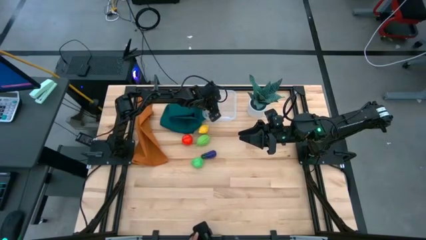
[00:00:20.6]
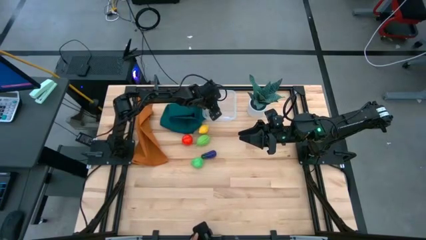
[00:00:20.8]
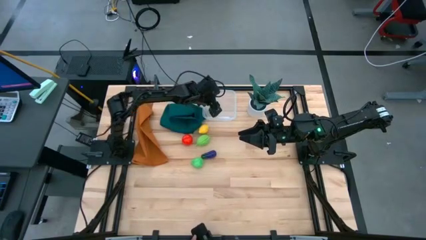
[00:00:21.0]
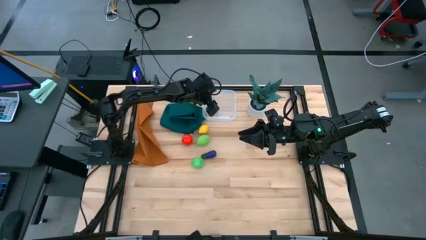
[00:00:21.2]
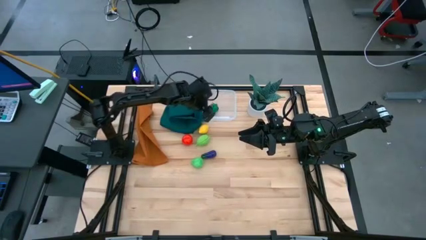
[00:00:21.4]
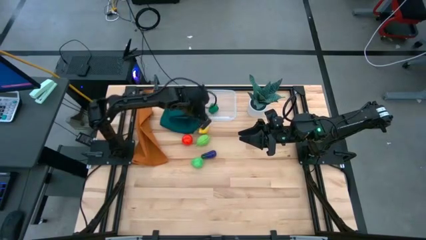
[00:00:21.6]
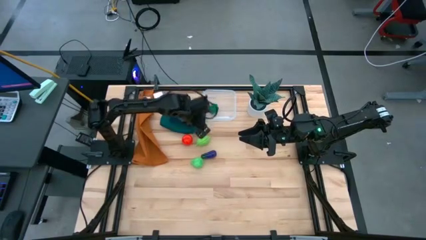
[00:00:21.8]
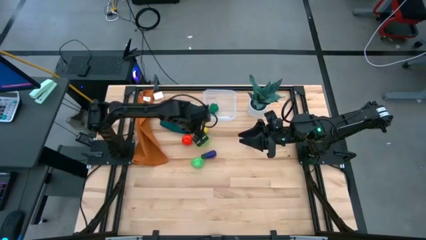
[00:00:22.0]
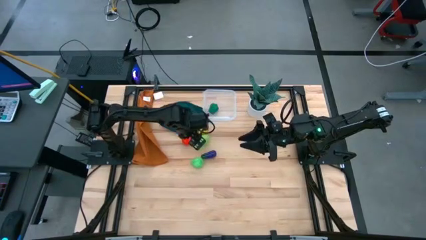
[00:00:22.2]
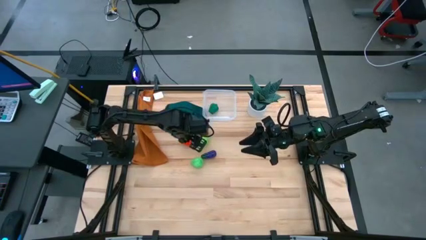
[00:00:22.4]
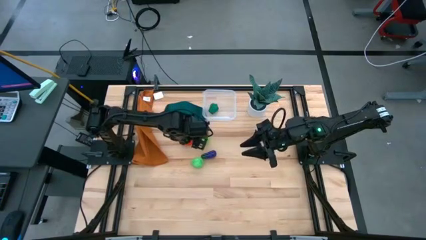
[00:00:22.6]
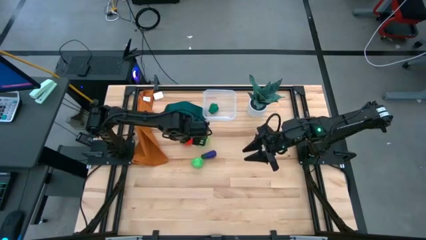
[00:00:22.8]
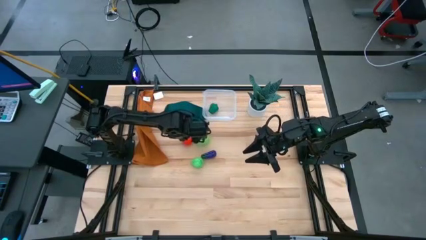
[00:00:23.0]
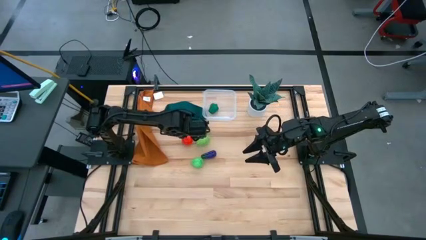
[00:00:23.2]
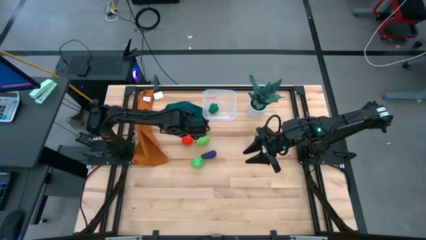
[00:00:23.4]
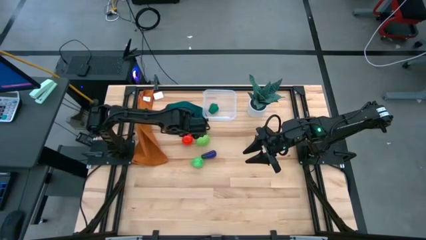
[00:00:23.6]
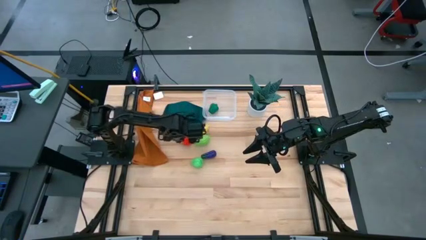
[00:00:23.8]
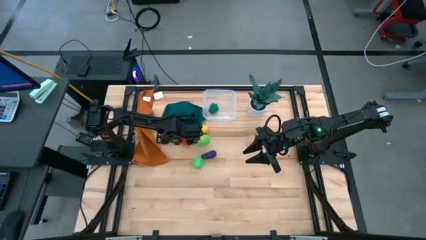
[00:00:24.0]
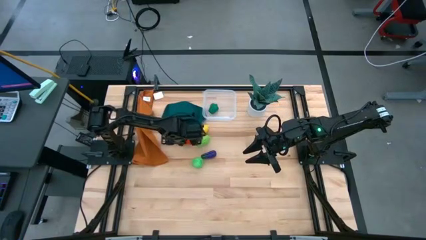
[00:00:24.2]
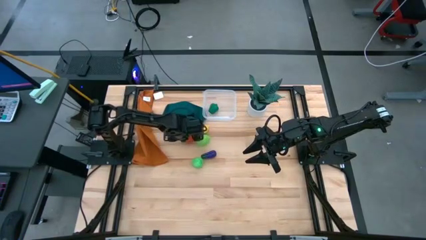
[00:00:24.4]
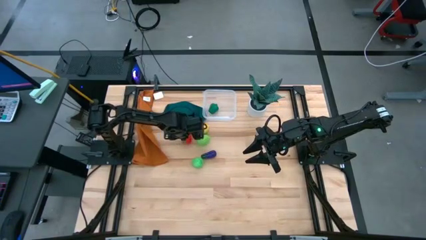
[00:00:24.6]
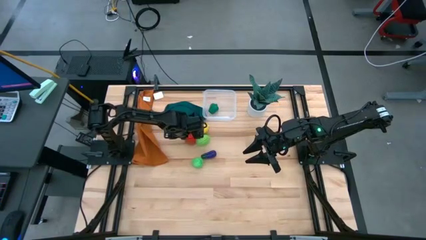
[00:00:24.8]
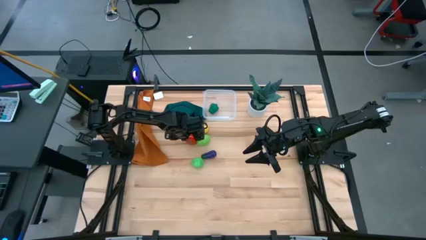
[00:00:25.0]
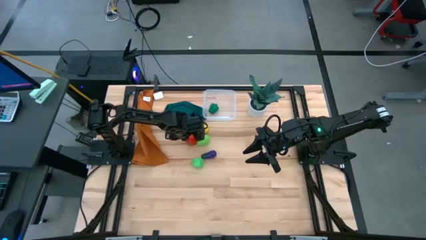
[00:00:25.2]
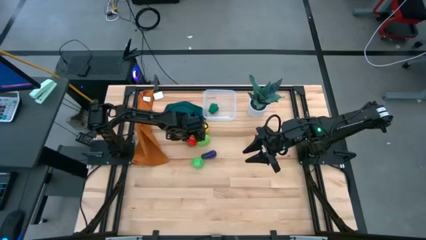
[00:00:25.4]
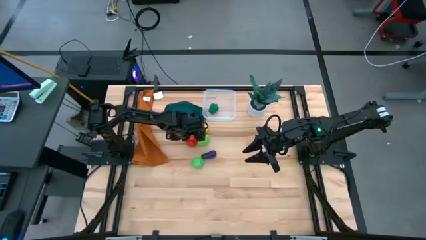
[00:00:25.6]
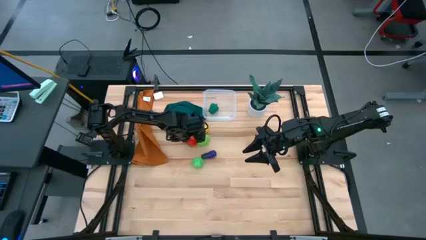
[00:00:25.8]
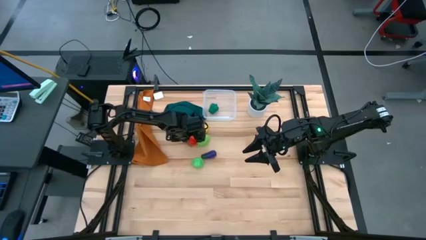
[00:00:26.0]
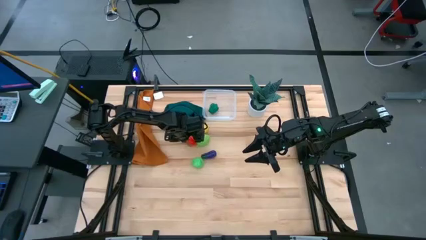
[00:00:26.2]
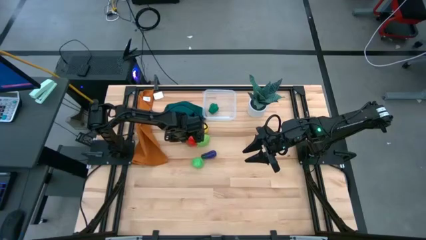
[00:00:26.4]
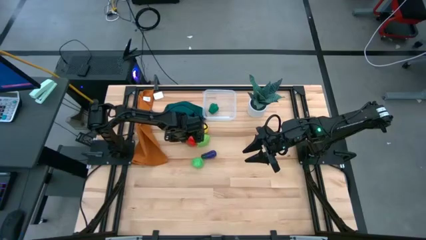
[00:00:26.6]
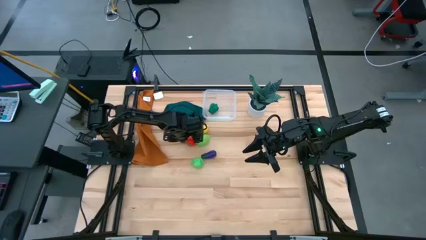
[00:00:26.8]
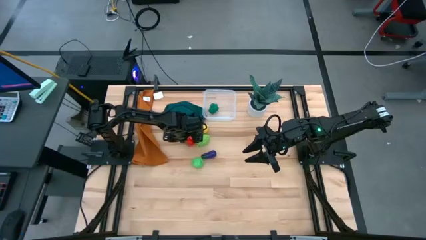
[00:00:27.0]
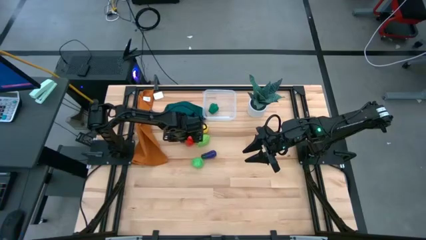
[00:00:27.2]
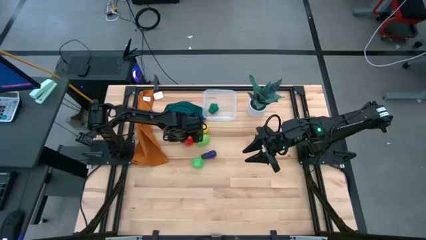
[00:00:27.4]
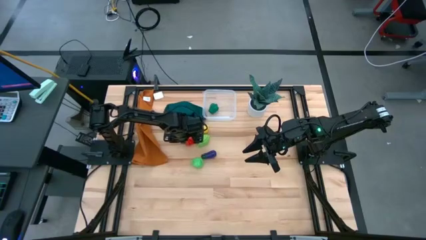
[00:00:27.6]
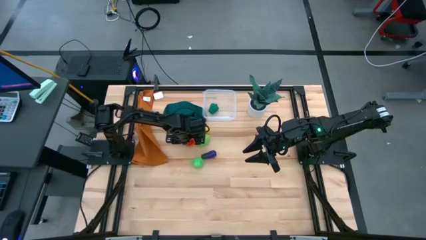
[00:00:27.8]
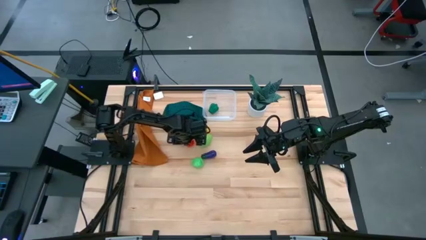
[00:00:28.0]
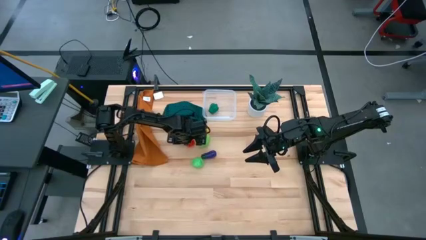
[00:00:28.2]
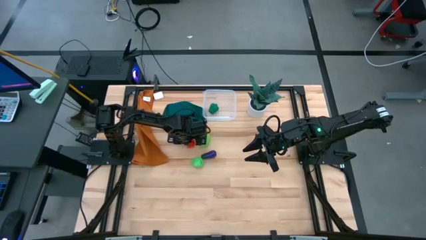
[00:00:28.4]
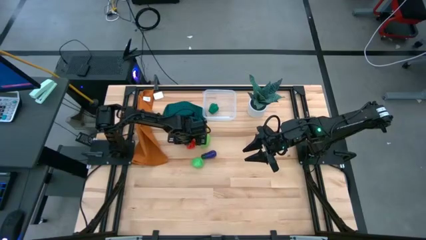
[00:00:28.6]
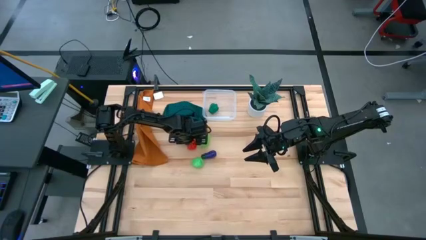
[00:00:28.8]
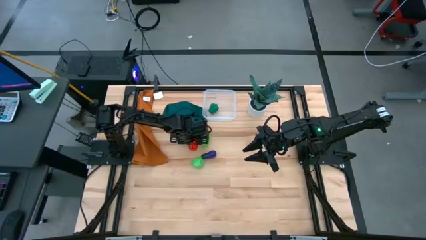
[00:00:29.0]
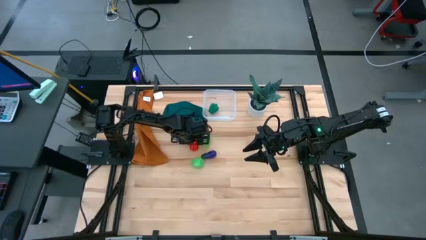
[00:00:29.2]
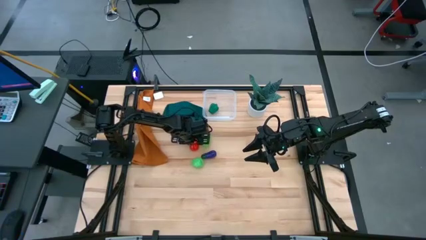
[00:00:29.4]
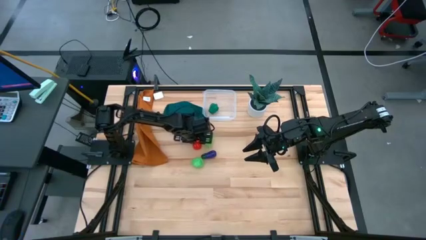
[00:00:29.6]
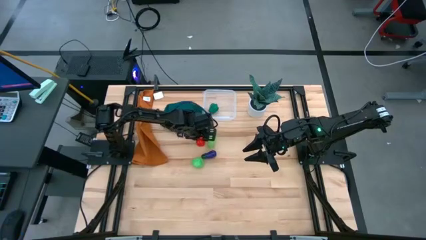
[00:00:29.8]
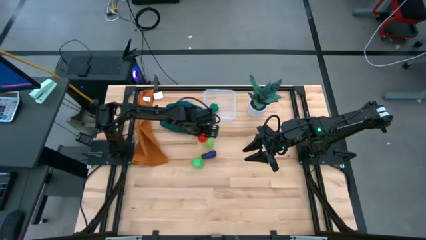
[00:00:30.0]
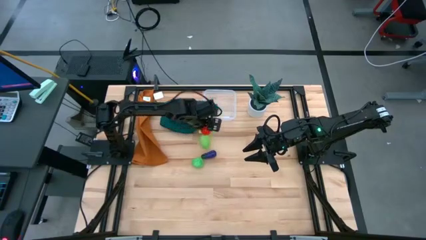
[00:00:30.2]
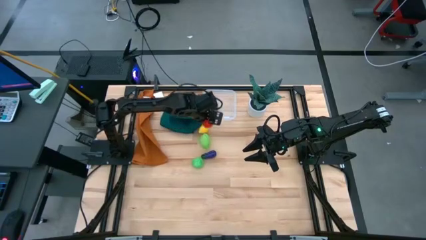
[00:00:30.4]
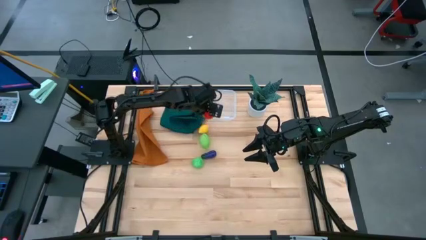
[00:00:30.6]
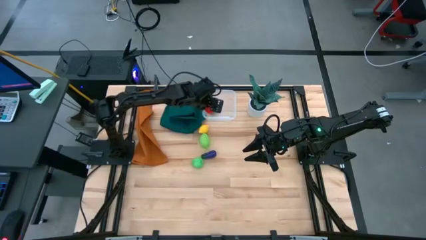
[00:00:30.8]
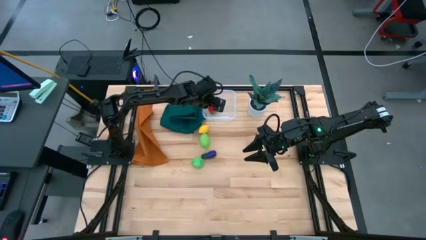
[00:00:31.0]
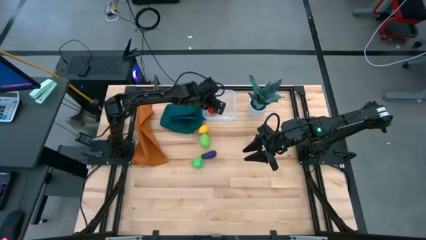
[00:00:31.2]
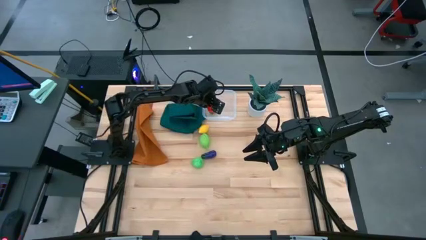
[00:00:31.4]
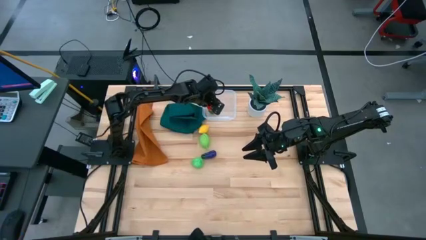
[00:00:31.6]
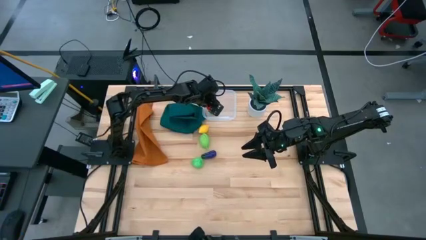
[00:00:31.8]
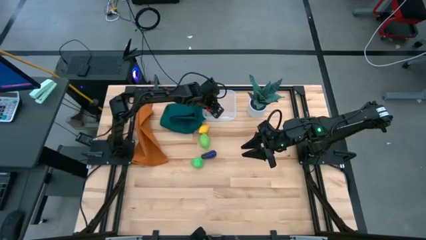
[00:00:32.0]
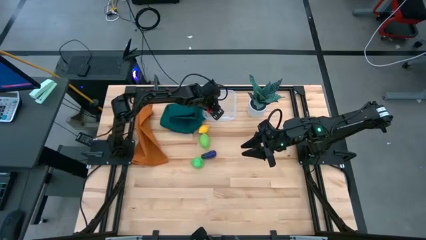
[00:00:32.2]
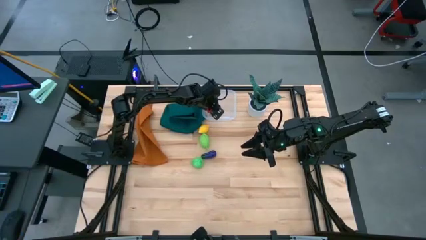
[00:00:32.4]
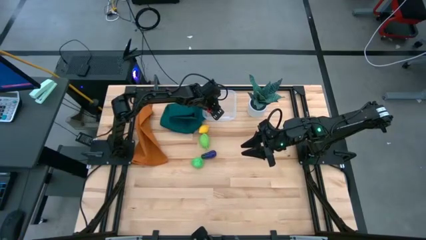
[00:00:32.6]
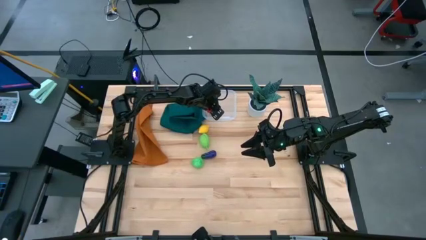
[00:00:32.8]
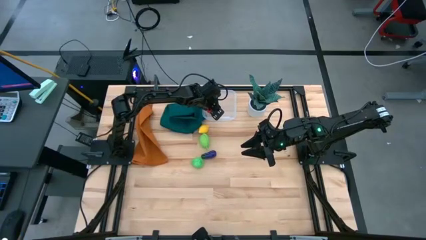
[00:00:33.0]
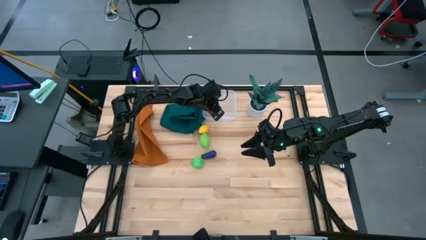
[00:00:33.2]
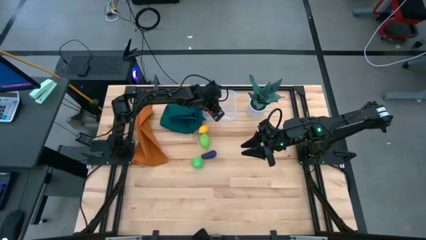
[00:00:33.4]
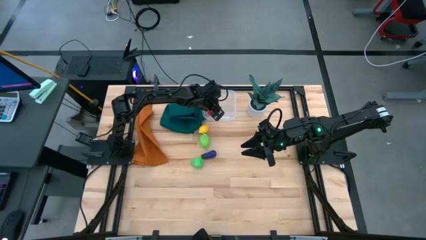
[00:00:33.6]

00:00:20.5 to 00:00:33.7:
Task: Pick and placing Produce into tupperware
Put the red tomato into the transparent bin
